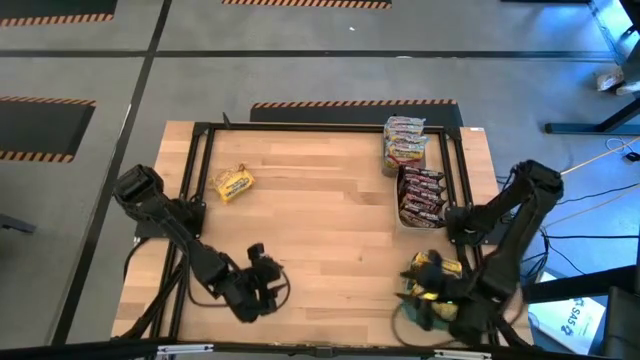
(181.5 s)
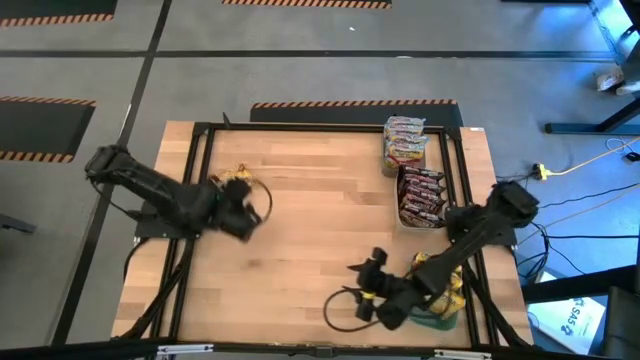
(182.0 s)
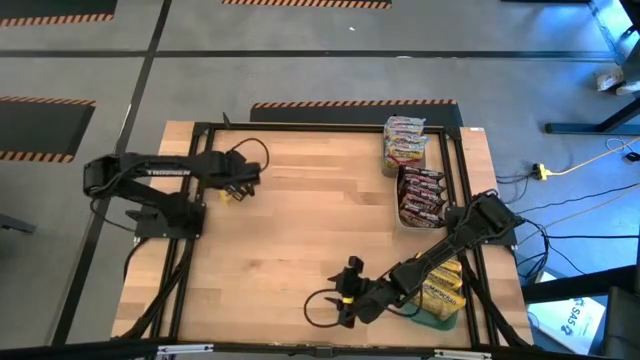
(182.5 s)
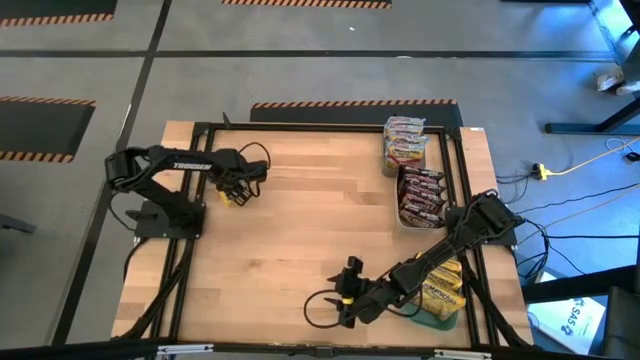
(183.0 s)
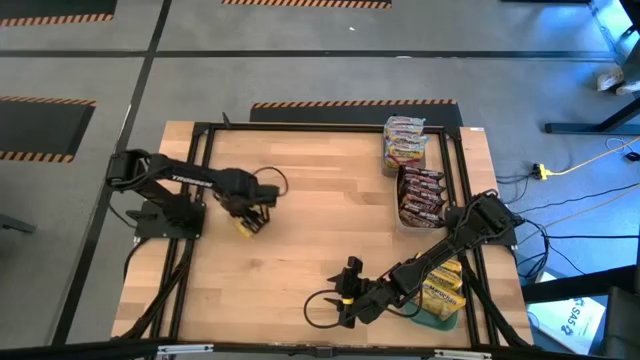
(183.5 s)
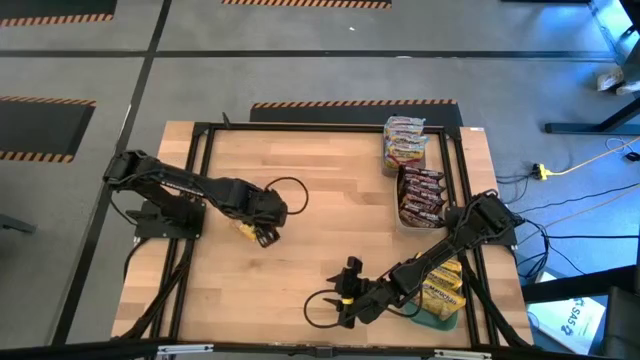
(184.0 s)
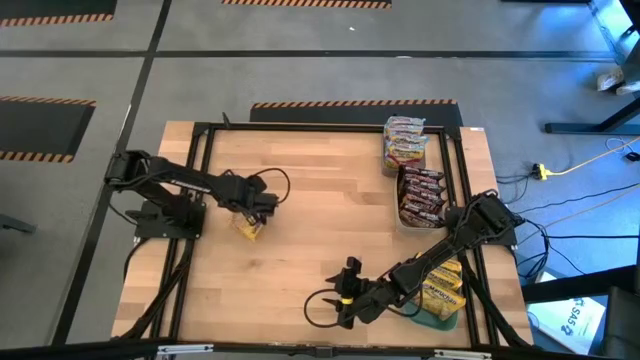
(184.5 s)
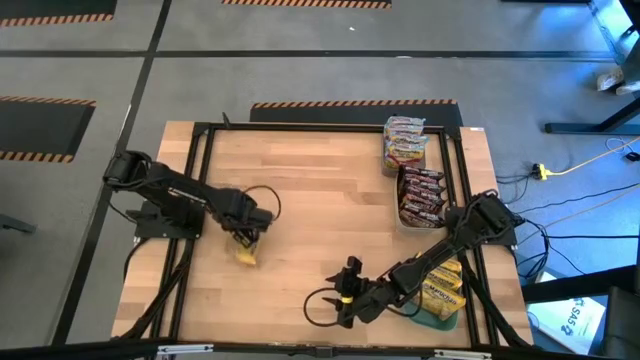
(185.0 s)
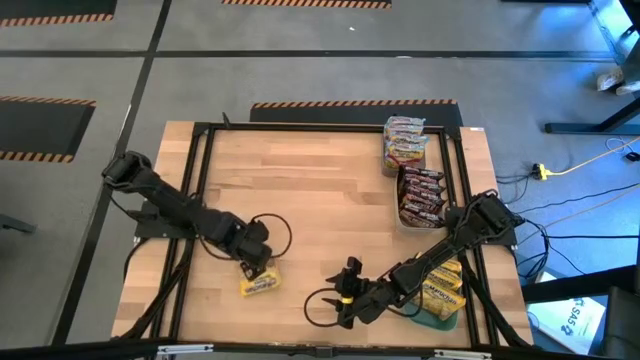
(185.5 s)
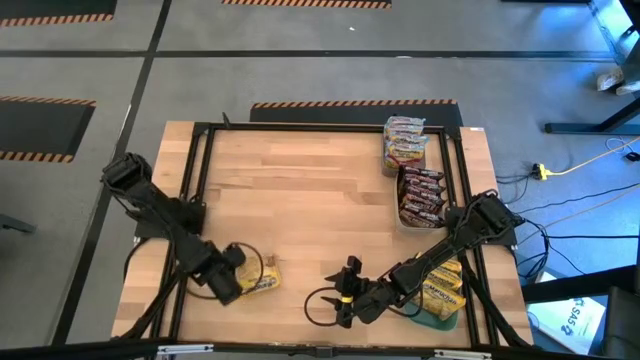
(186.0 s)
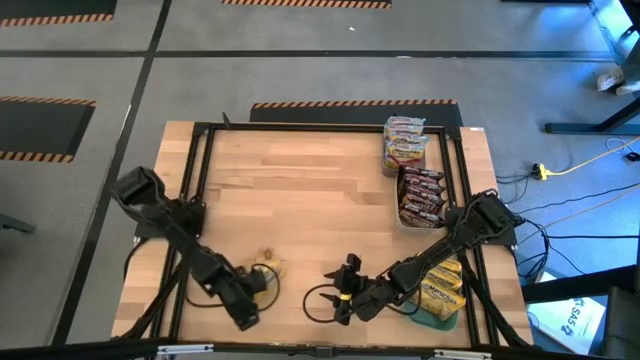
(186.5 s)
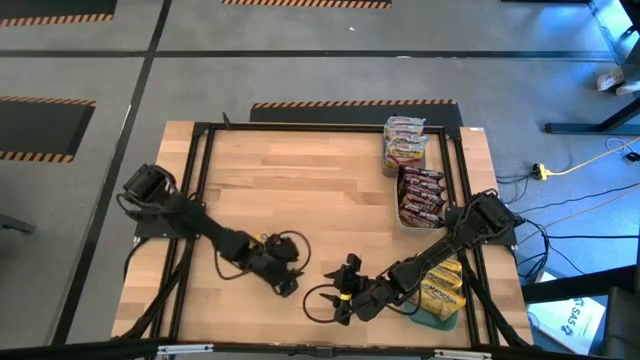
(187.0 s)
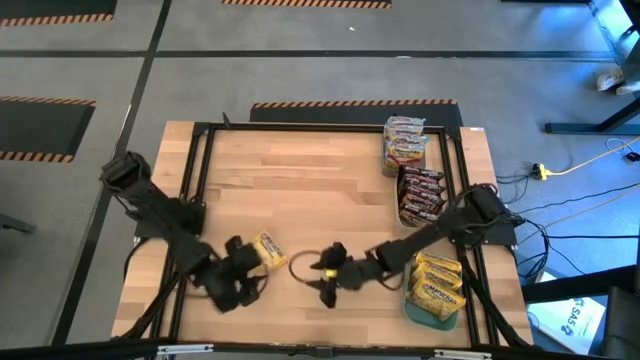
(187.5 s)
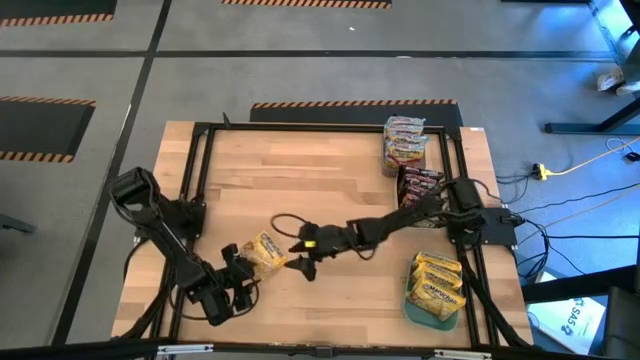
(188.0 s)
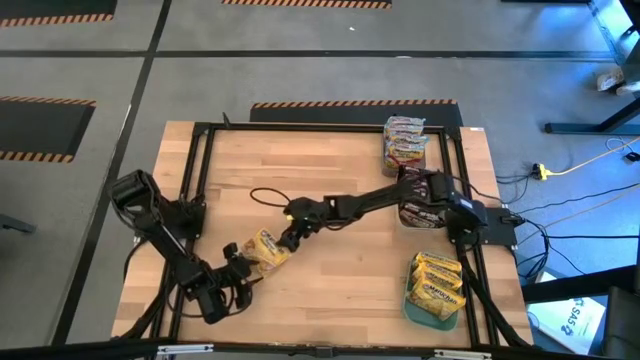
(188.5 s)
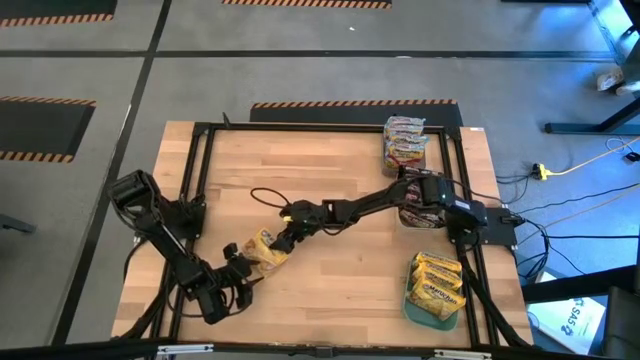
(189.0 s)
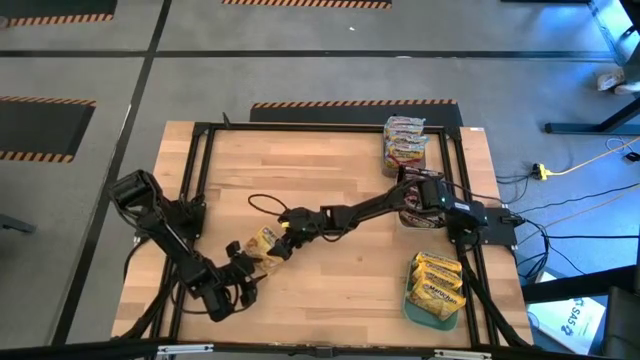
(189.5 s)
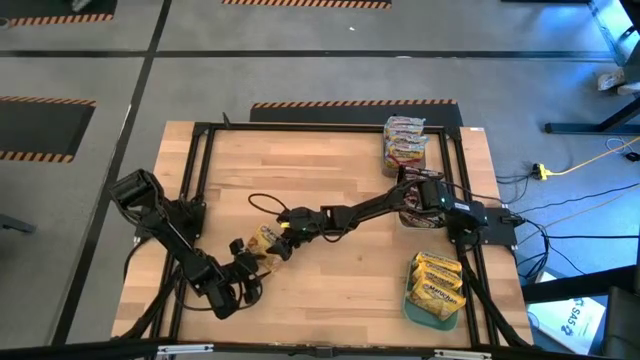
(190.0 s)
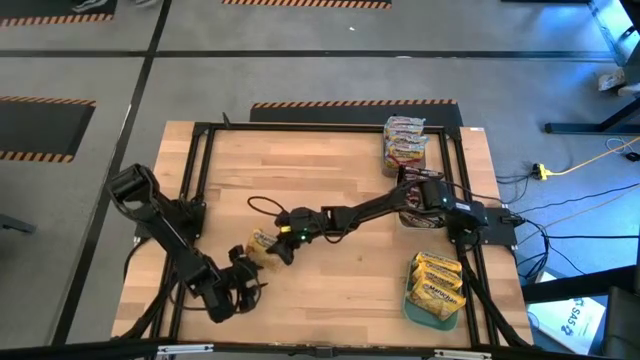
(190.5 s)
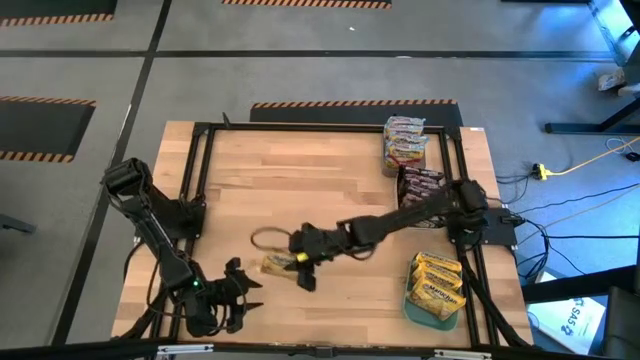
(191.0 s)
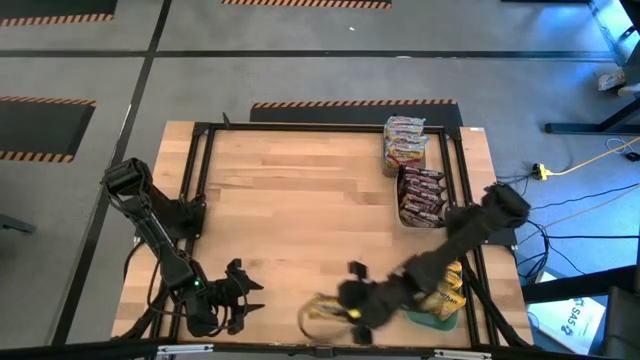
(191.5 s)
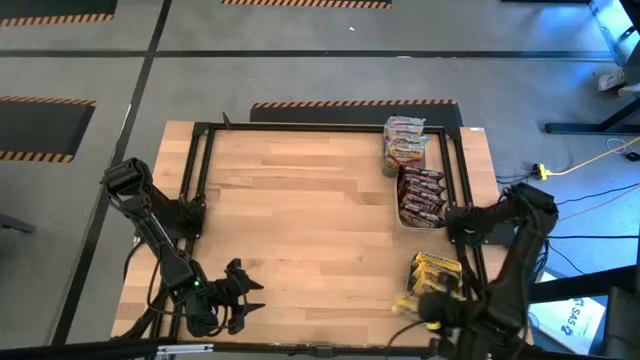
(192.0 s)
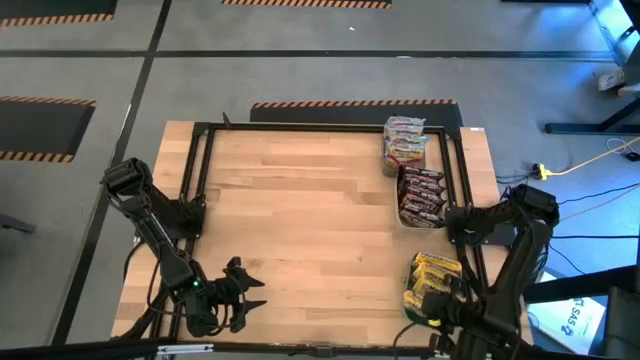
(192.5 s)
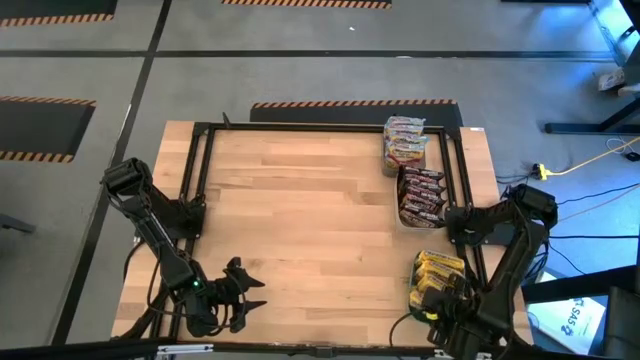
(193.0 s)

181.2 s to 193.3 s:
Task: Sort Maruchan noodles
Put the yellow noodle pack into the green bin

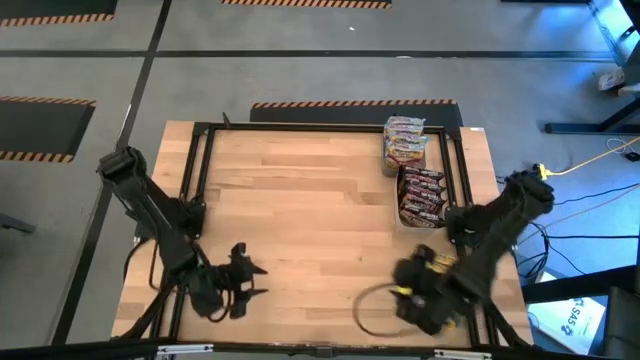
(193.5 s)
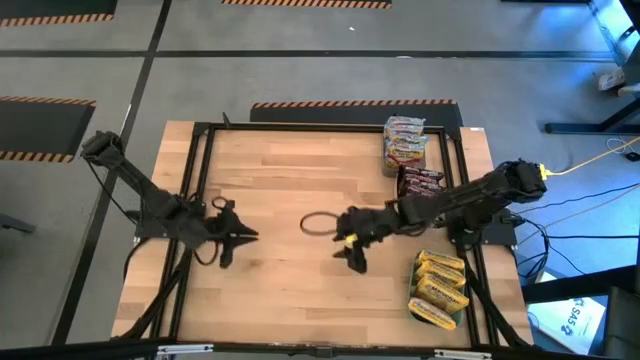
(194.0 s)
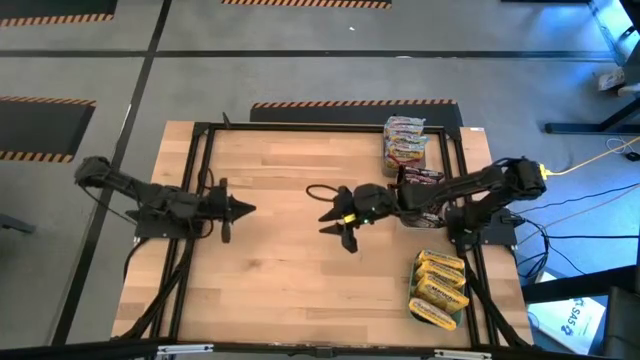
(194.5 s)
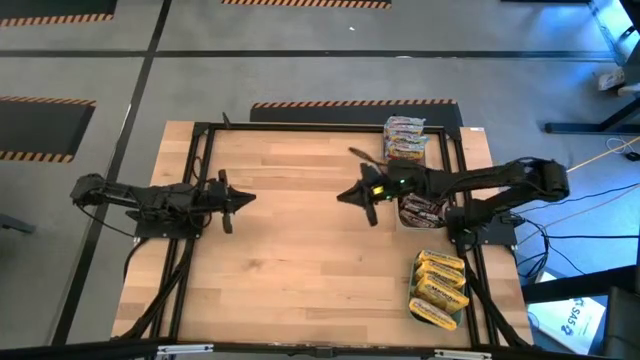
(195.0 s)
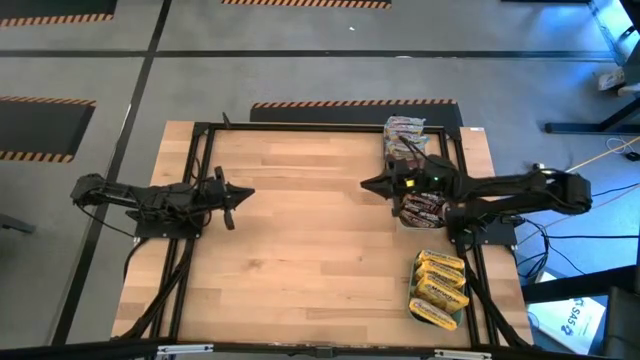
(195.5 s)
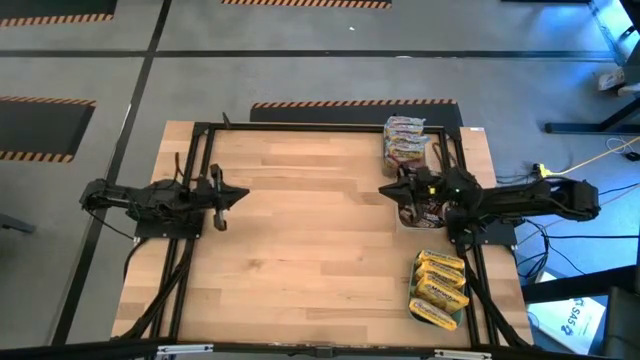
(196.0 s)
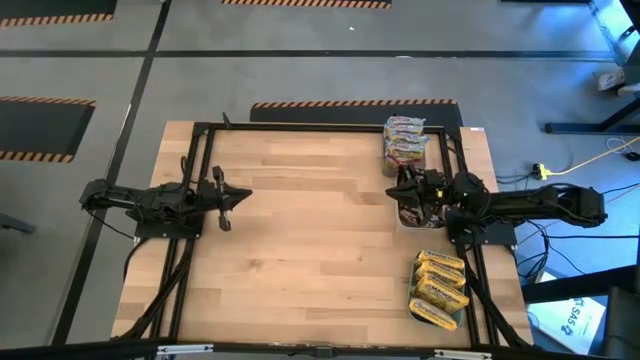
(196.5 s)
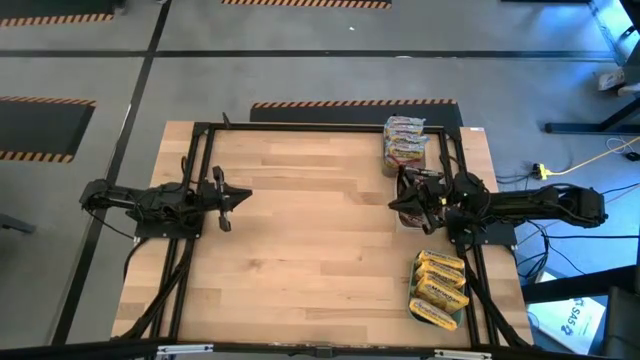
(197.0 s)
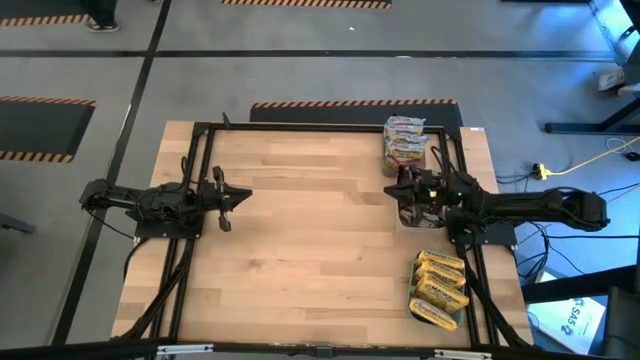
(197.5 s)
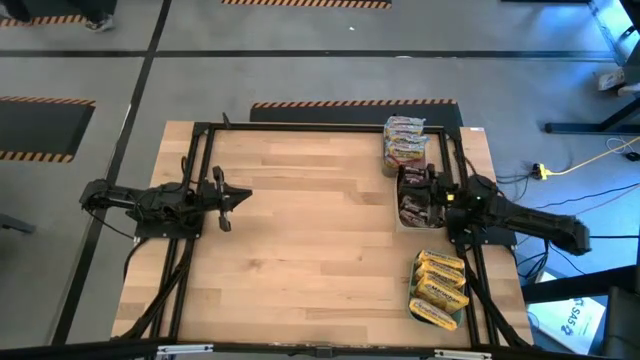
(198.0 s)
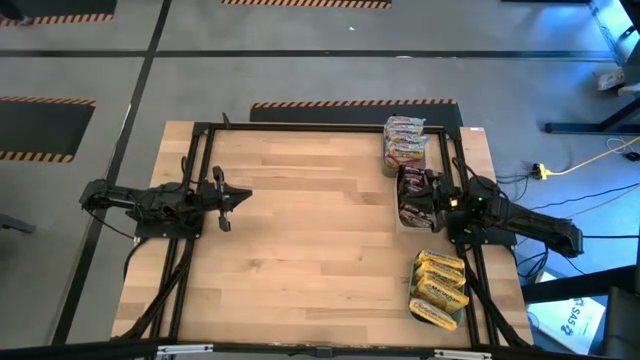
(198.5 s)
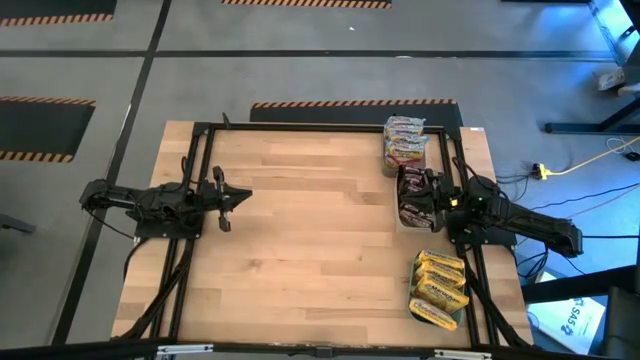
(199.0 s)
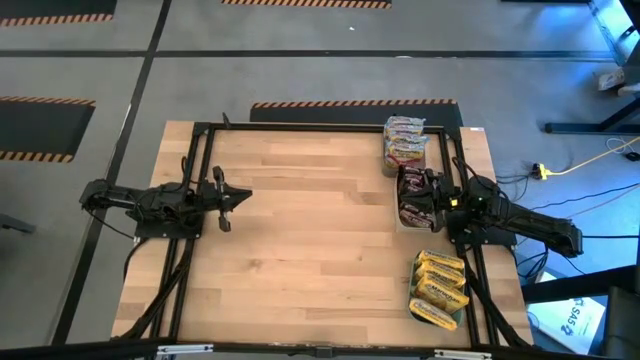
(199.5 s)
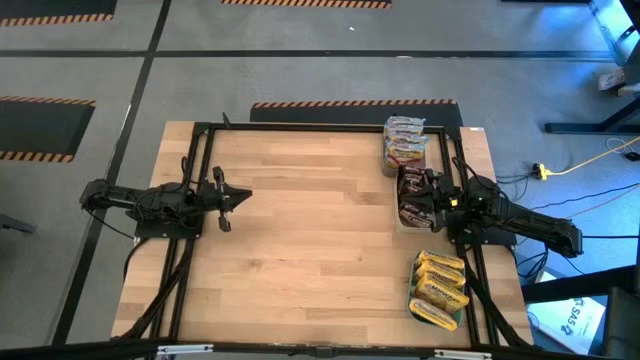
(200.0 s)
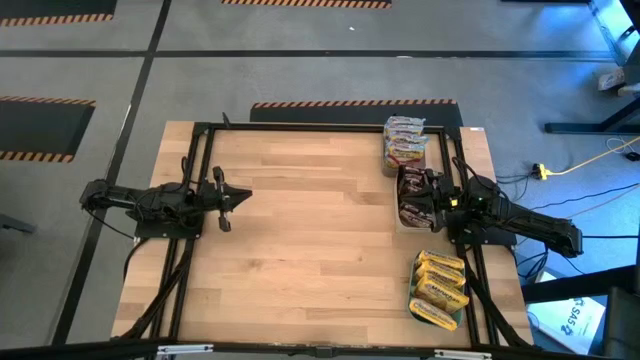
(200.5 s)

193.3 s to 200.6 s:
Return to Home Position

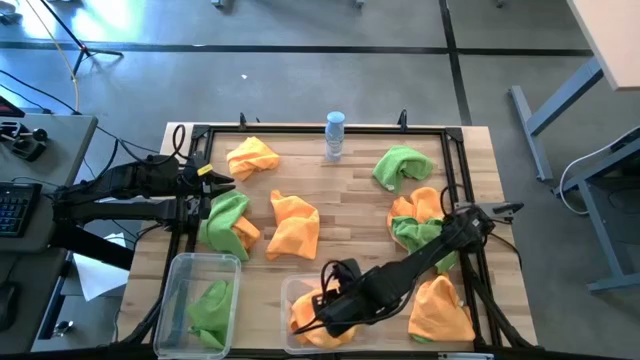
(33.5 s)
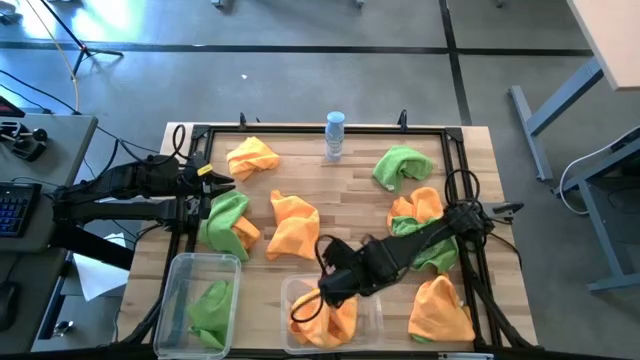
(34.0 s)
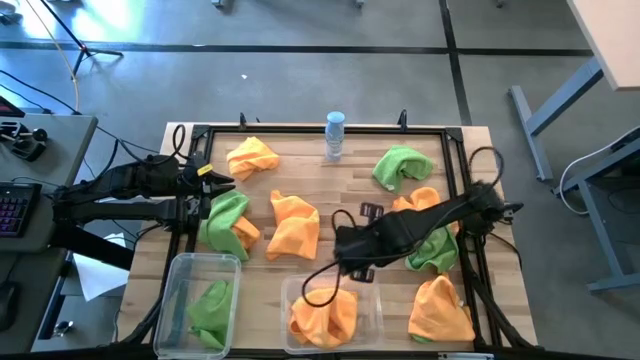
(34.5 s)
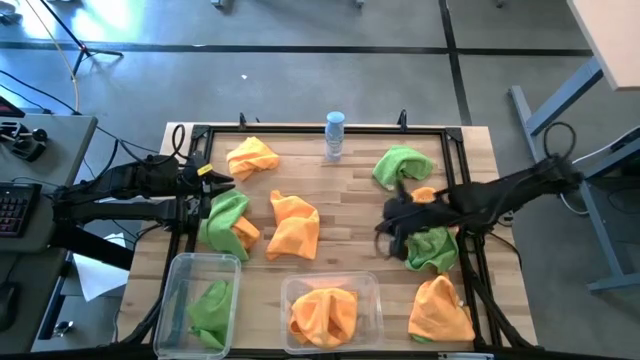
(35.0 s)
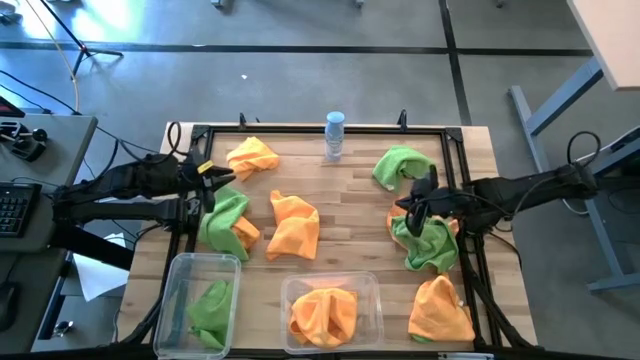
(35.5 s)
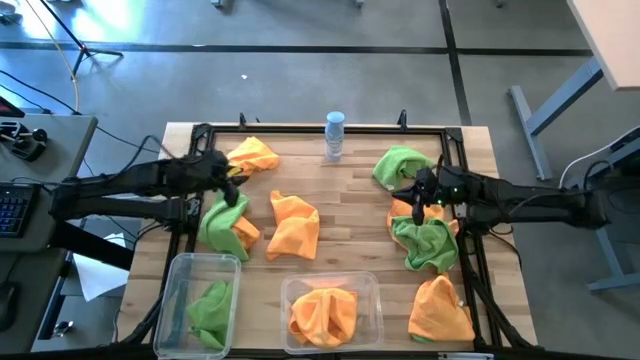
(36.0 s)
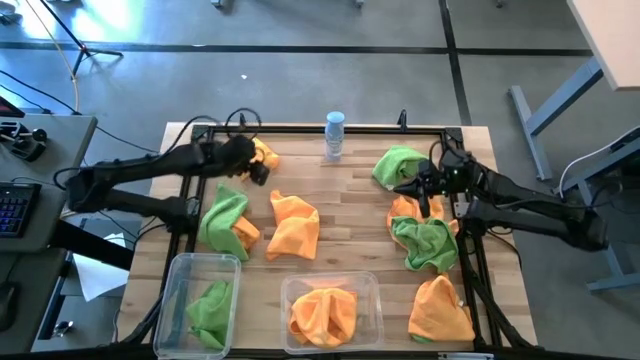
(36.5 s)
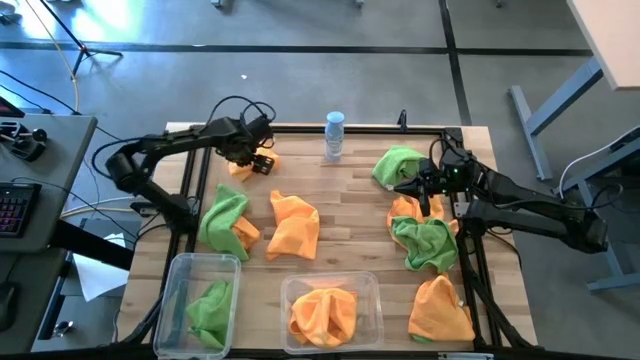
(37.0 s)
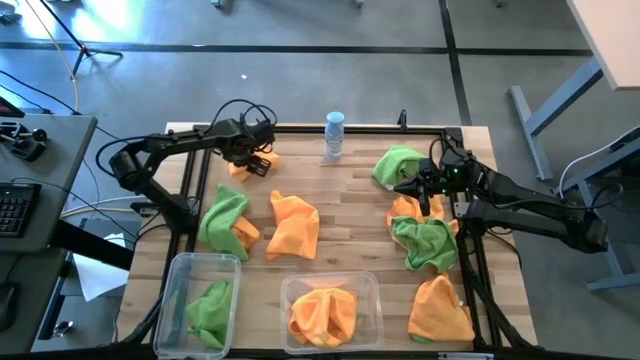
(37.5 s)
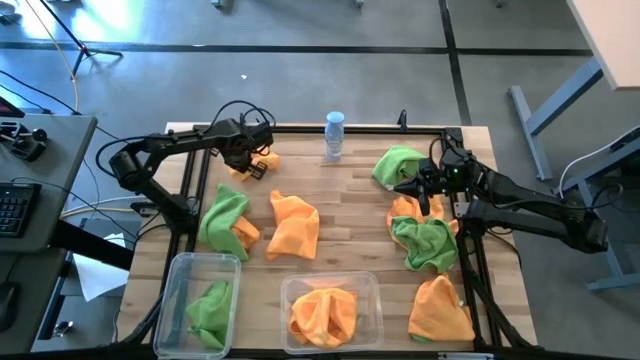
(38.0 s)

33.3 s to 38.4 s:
Task: Sort microfiber towel by color & place in baskets
Put the orange microfiber towel into the right transparent bin
